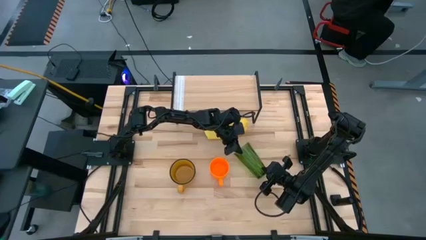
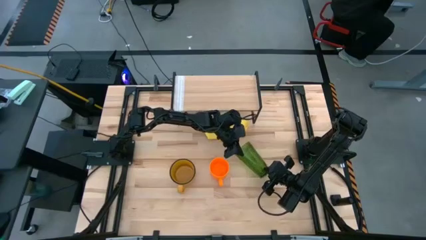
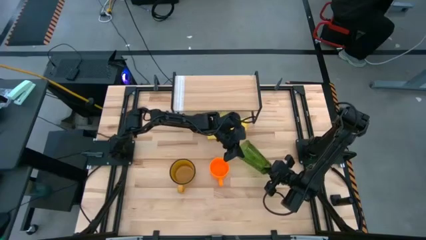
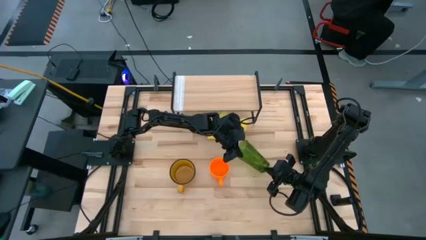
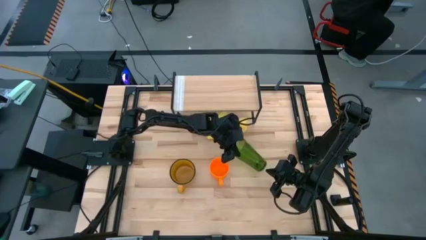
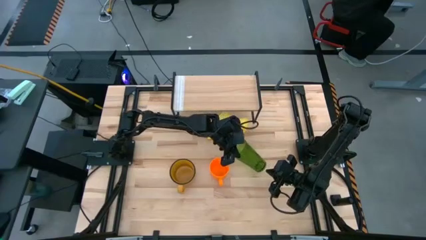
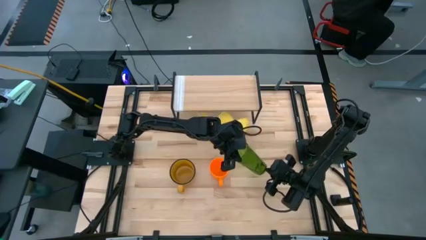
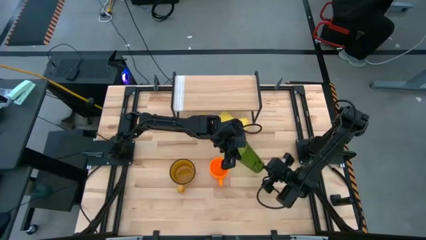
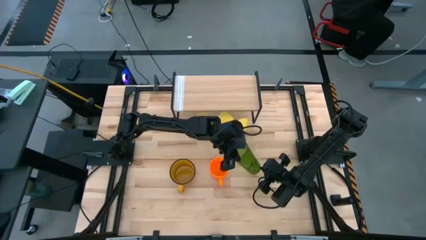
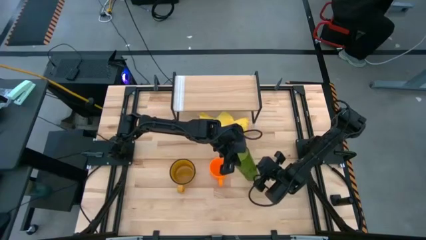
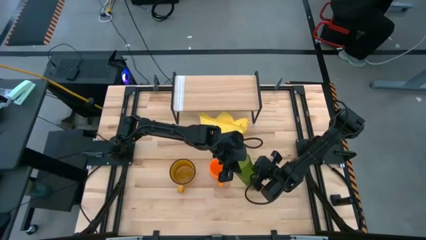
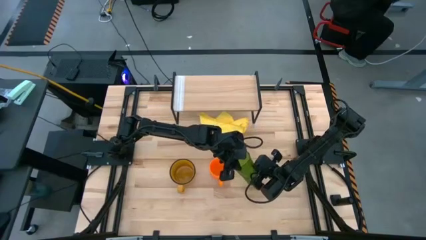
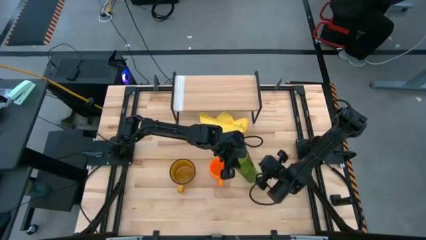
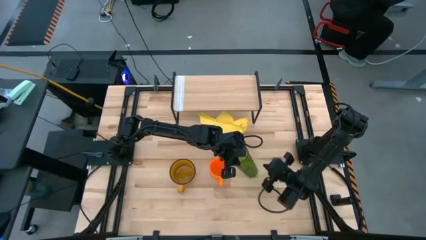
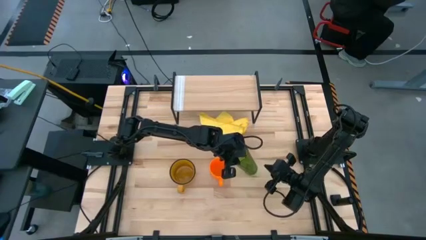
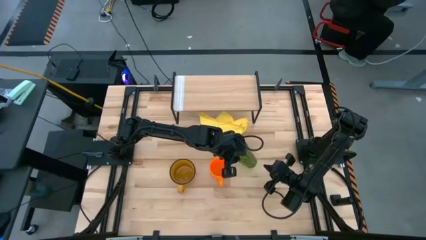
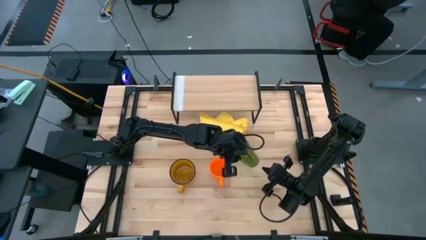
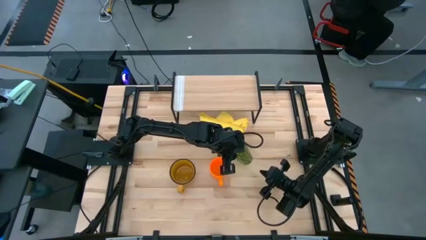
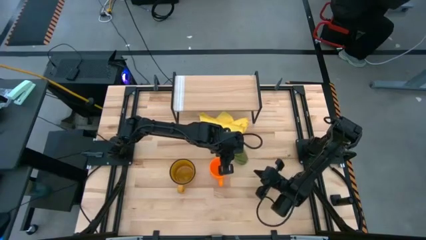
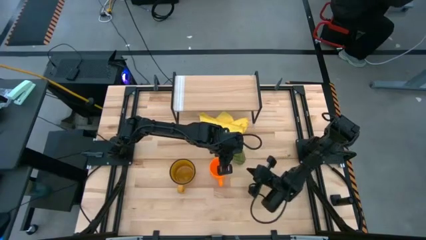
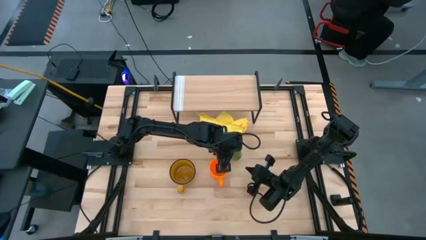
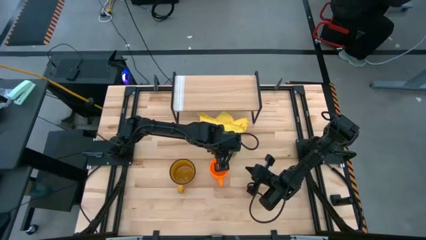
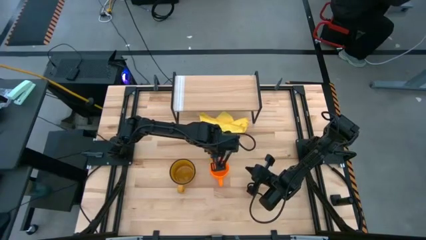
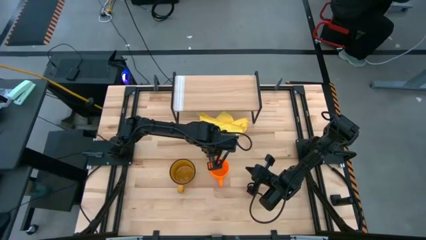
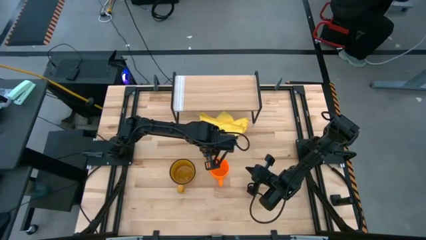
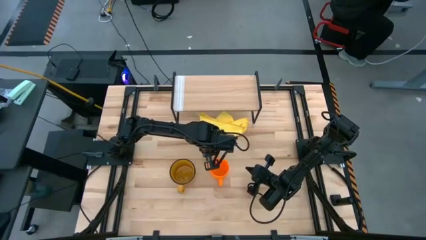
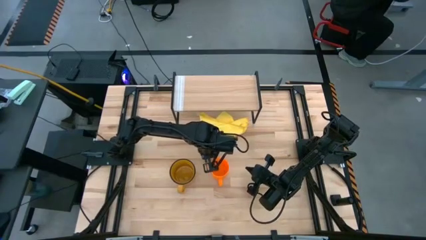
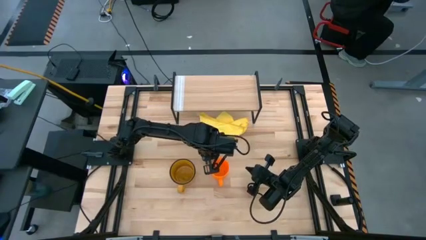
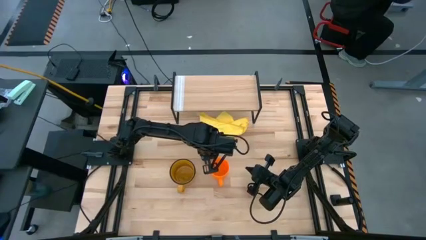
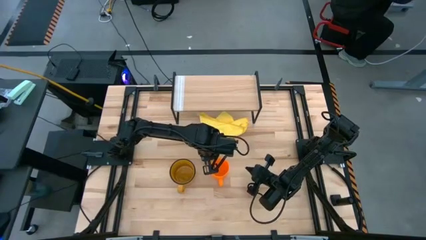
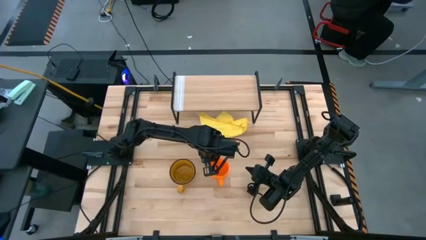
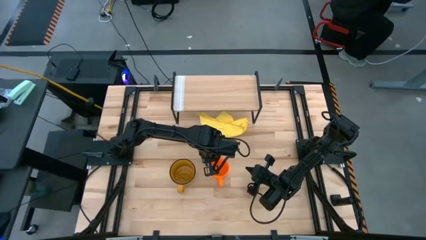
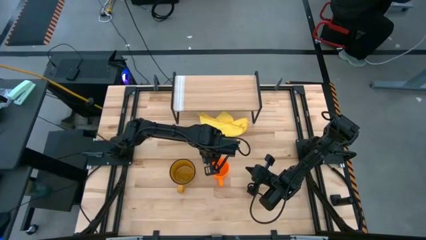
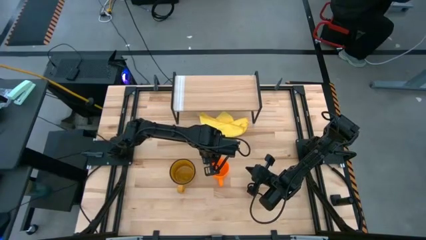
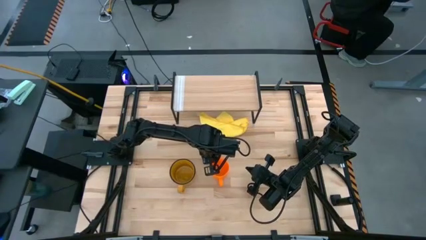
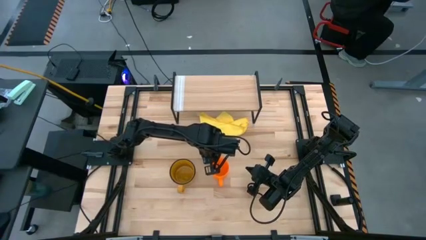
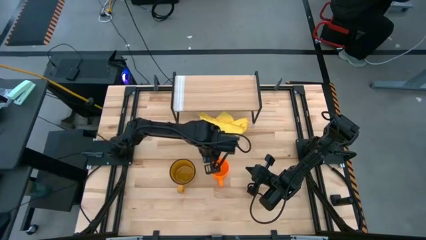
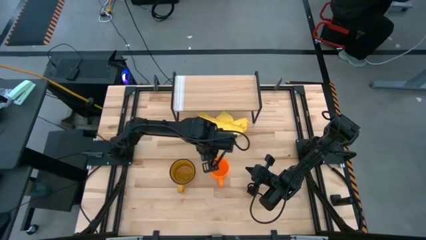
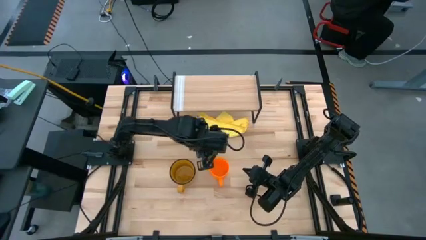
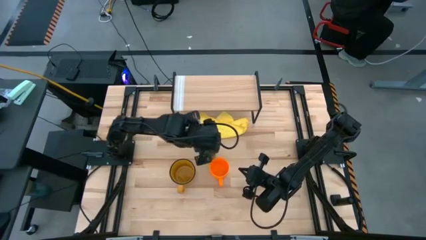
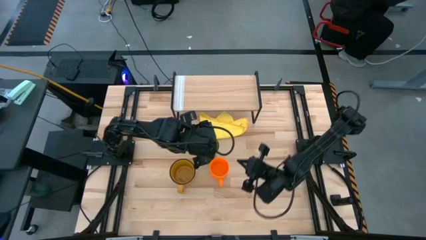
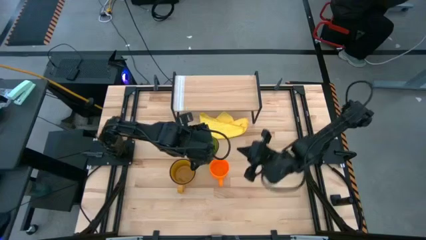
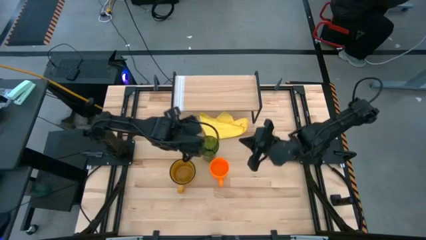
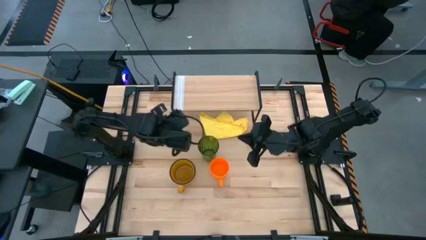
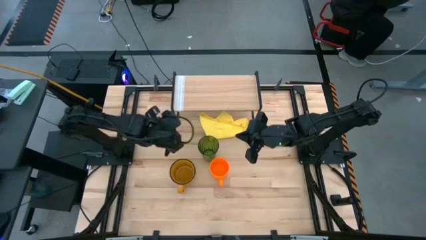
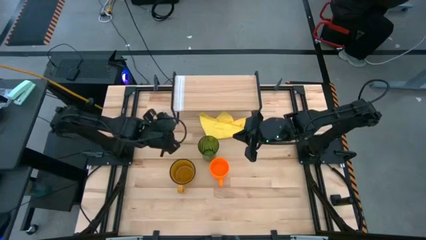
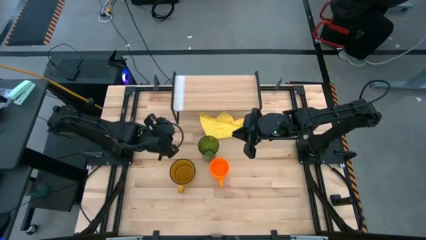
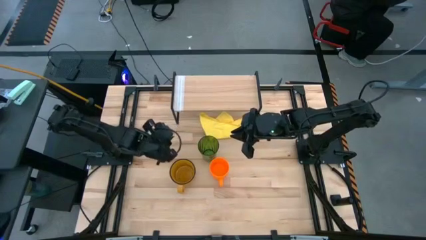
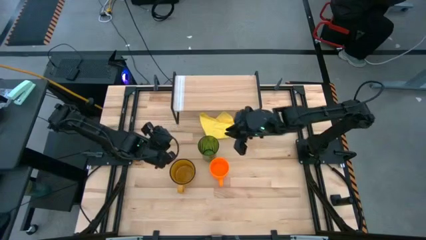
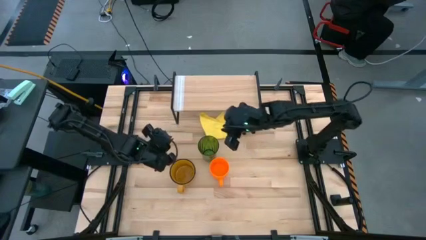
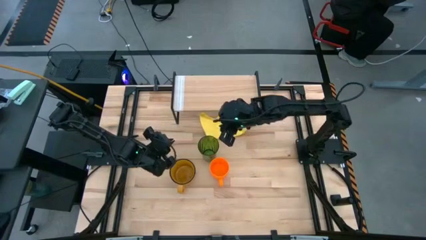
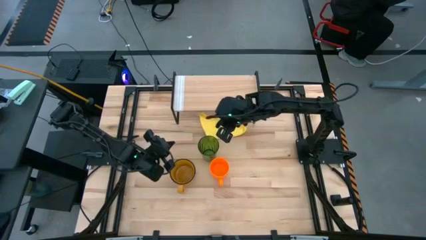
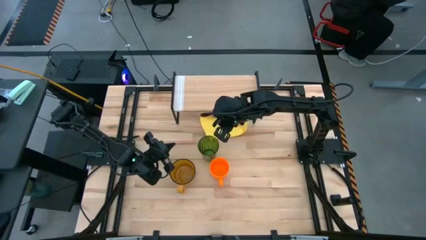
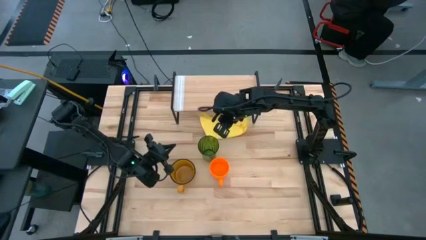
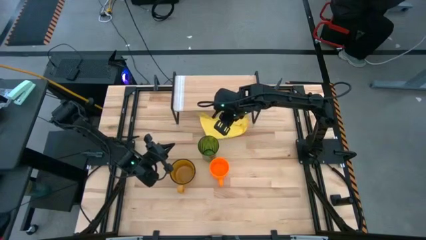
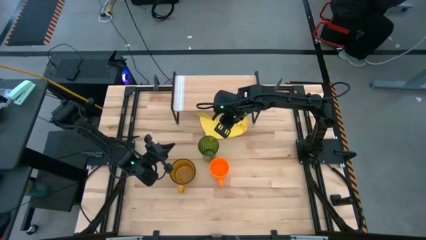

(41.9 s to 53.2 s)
Task: Stack small to large cups/mugs on shelf
Put the green cup on the shelf
